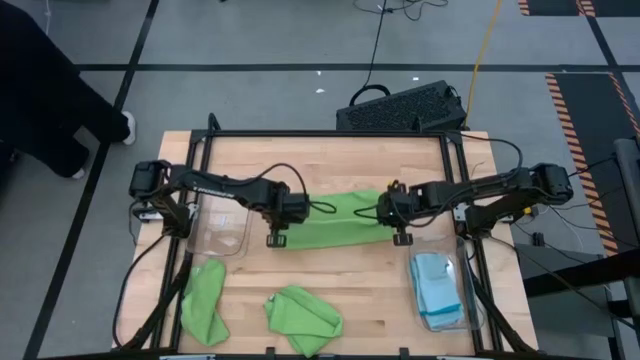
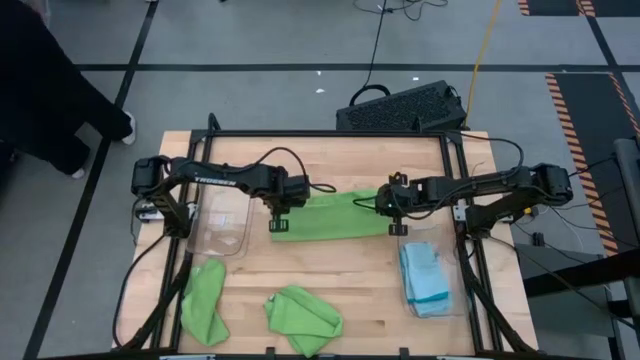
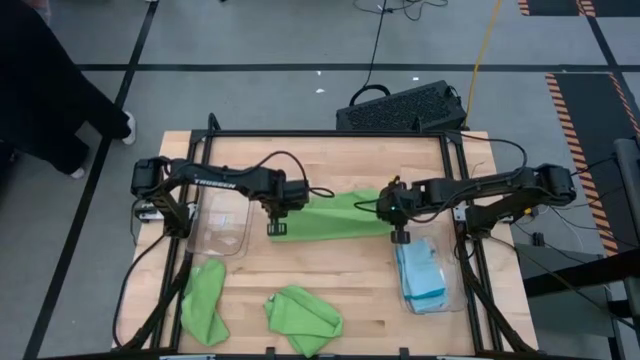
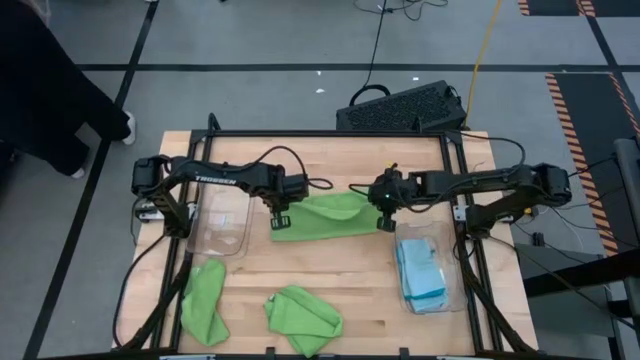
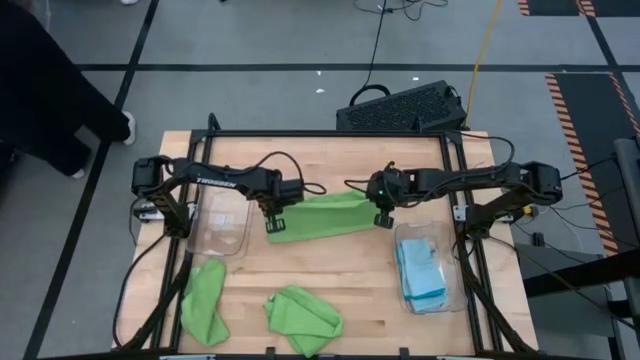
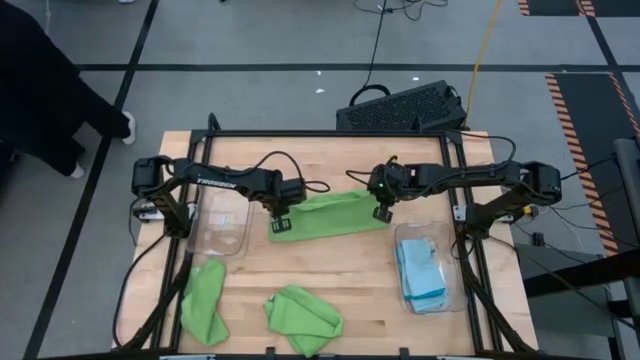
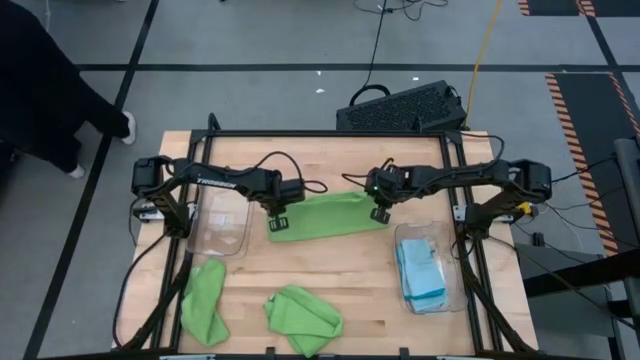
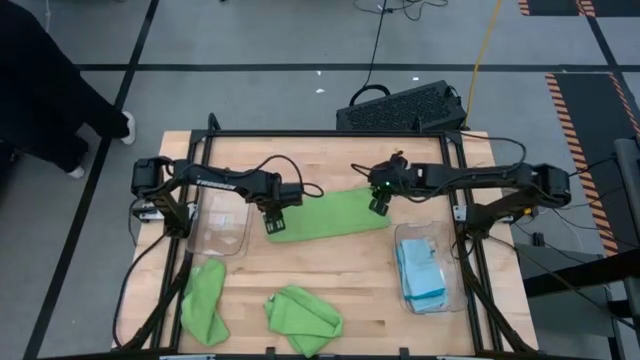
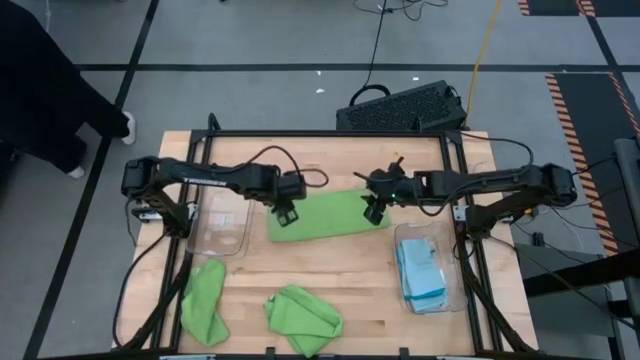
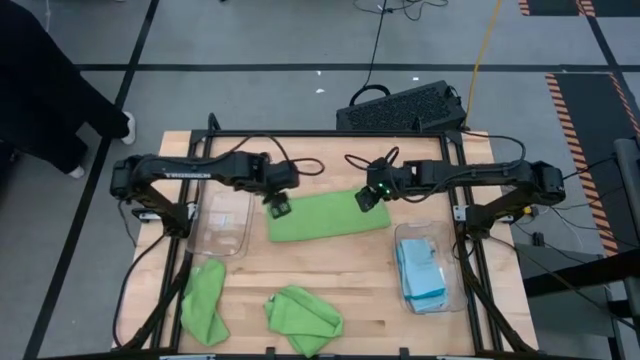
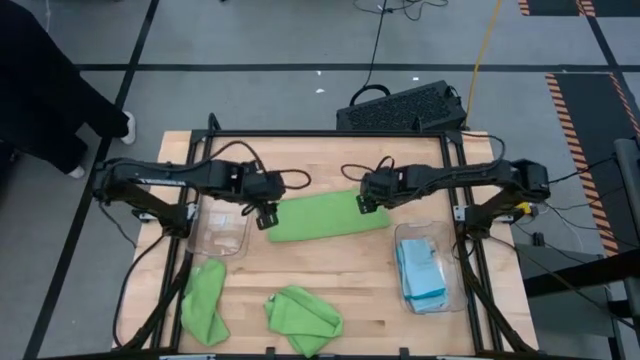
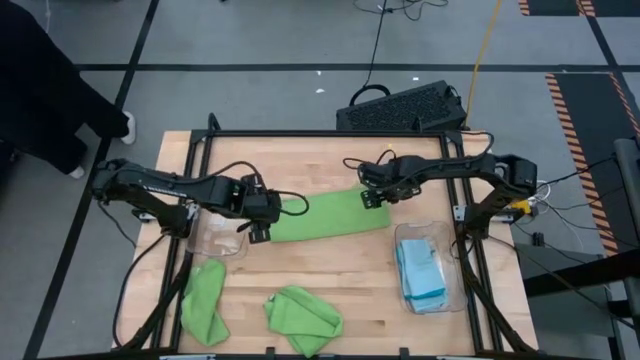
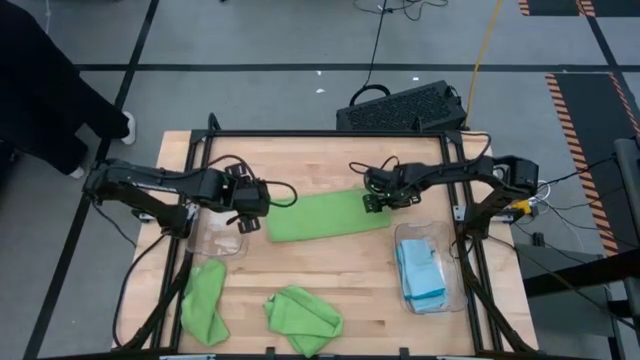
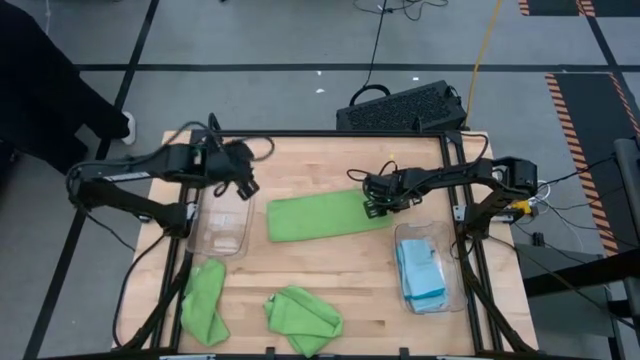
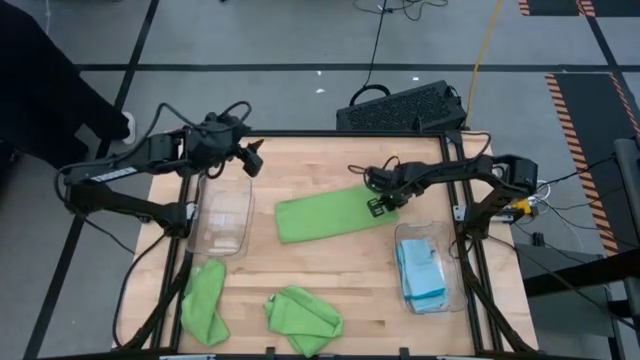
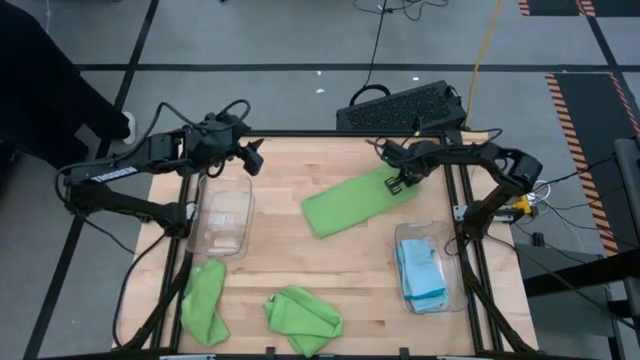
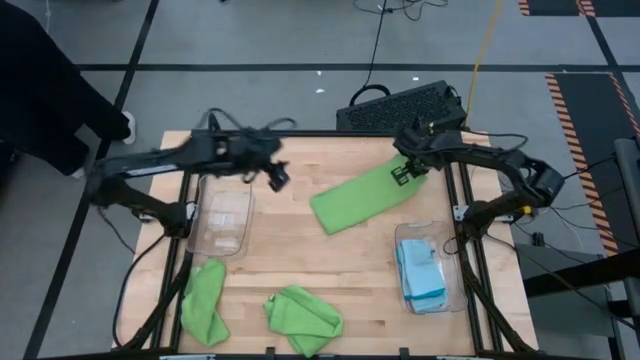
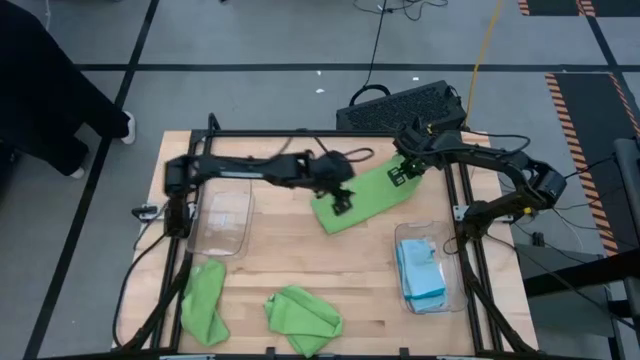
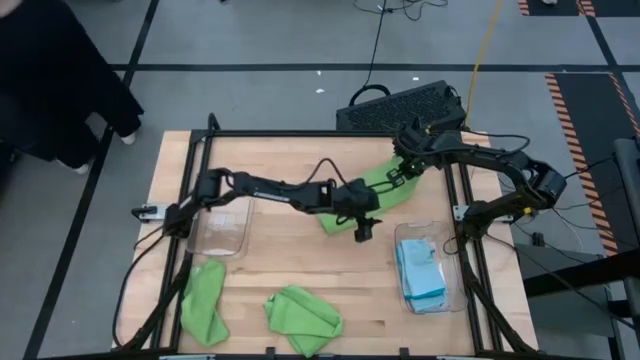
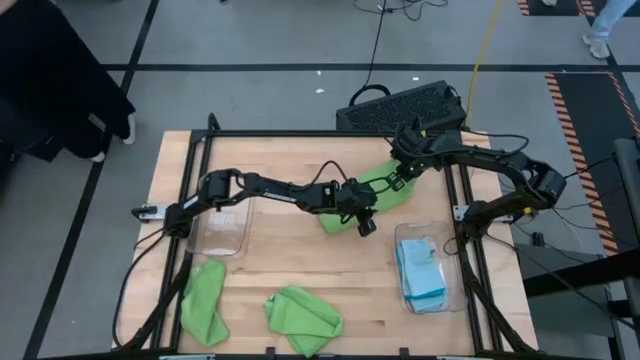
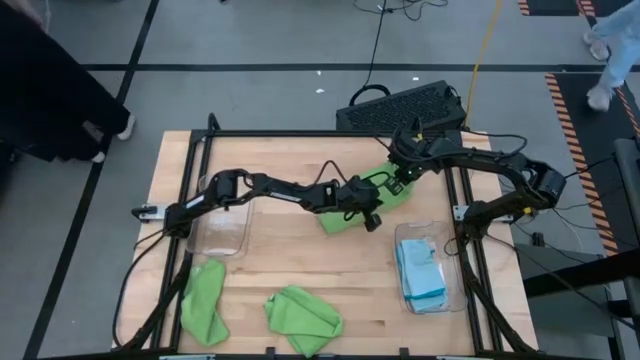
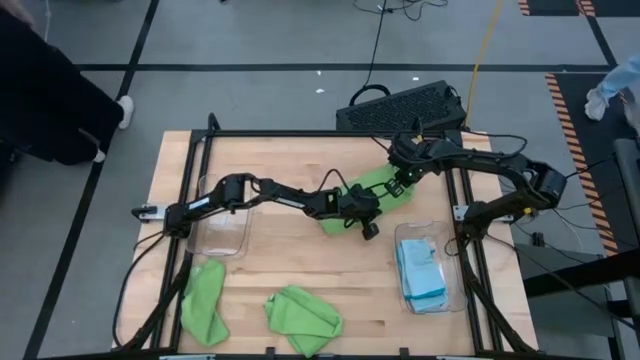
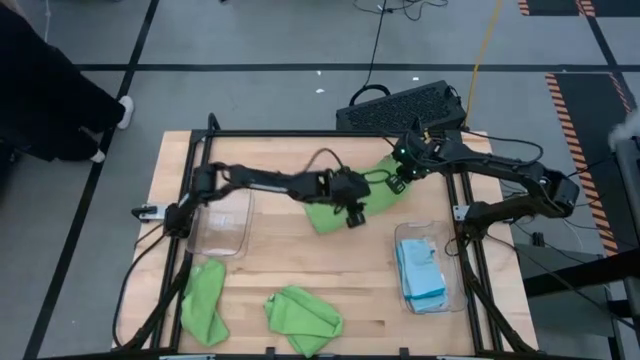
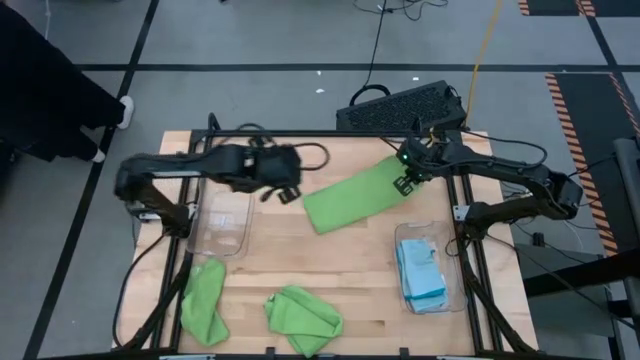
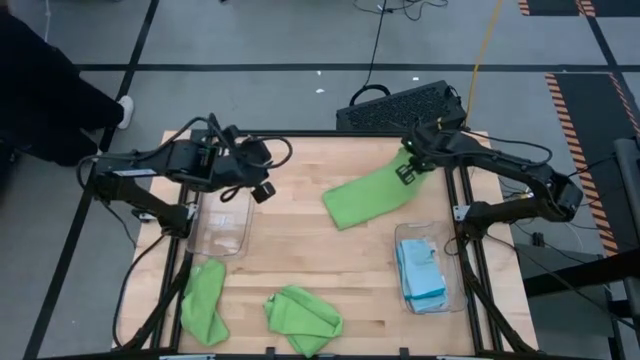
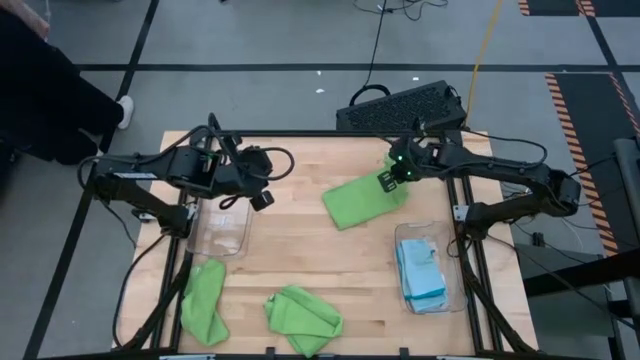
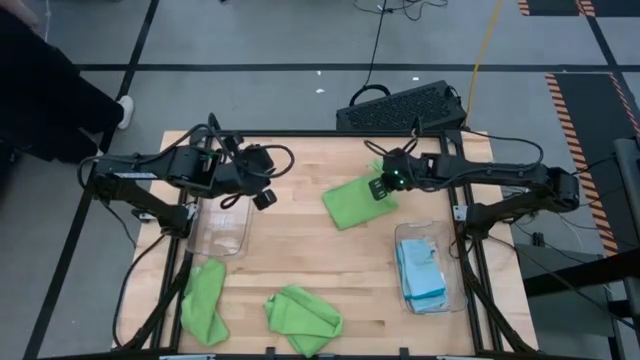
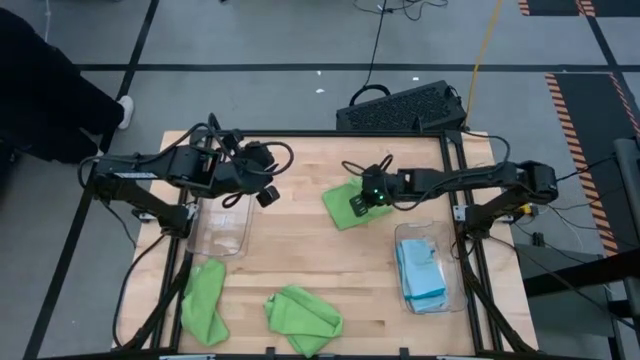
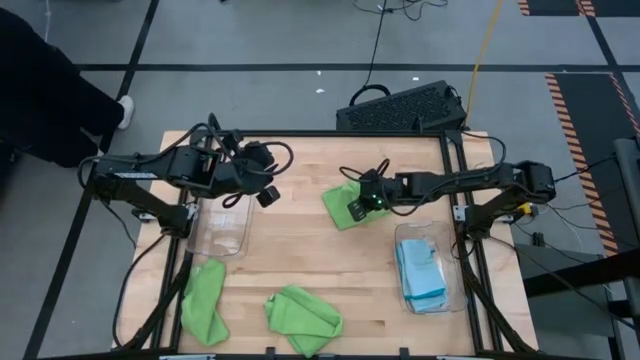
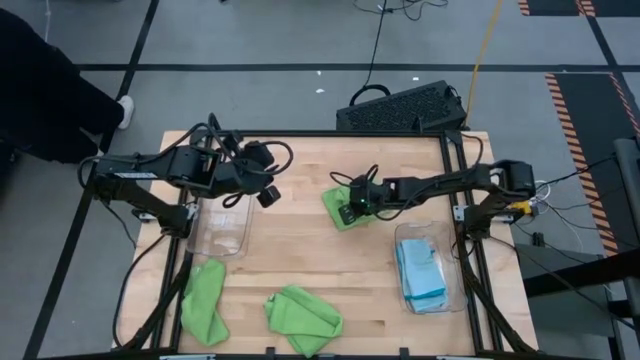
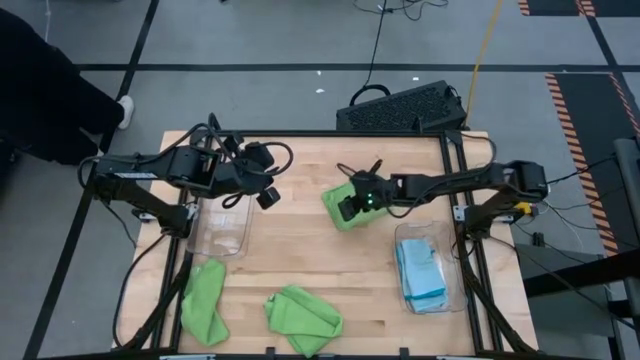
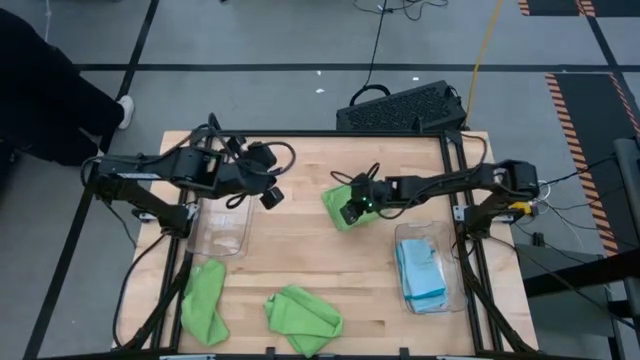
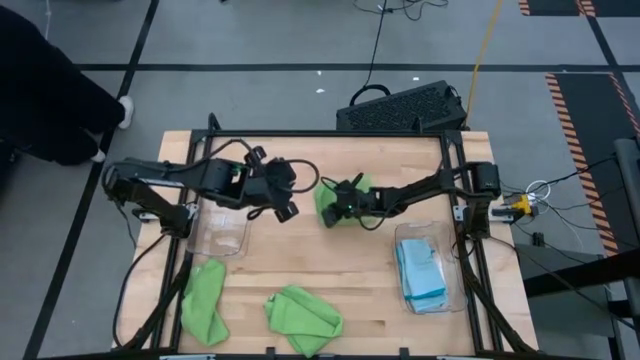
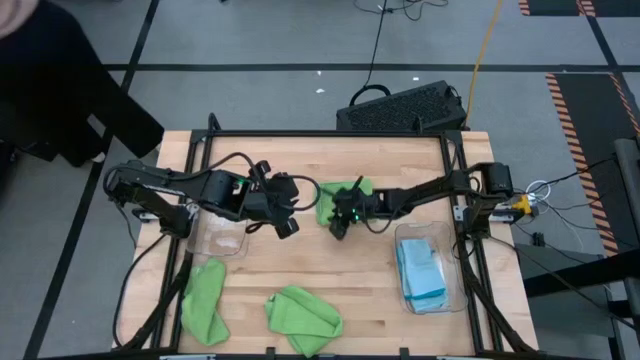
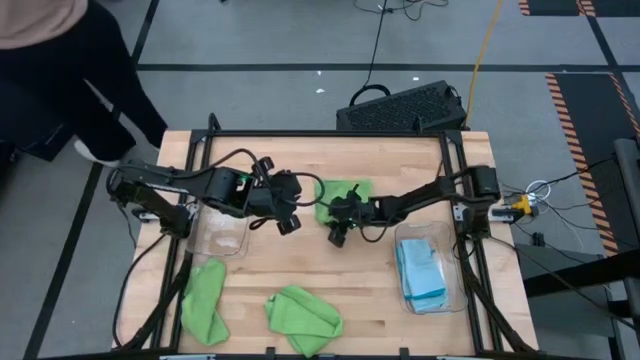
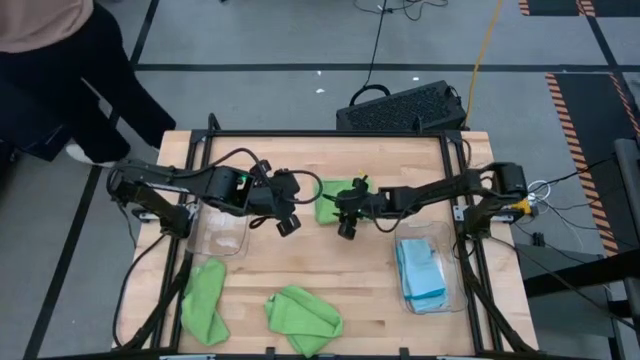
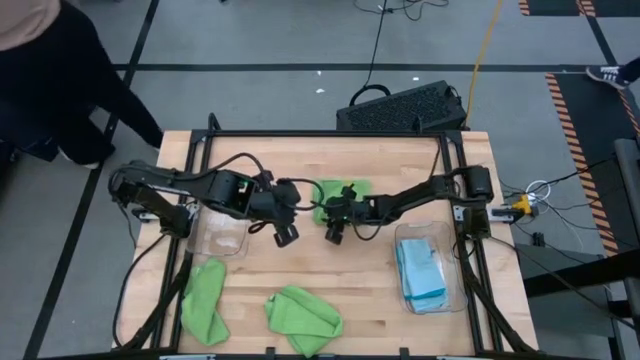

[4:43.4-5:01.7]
Task: Sort microfiber towel by color & place in baskets
Fold the top green microfiber towel

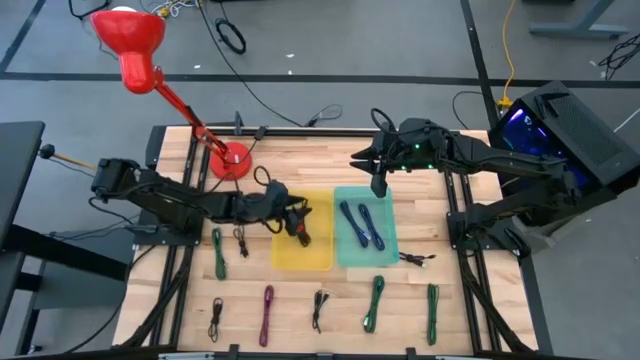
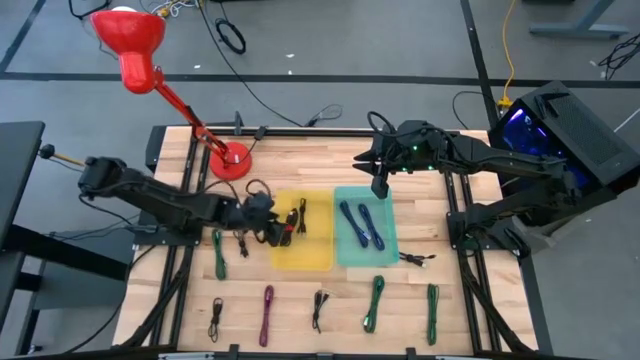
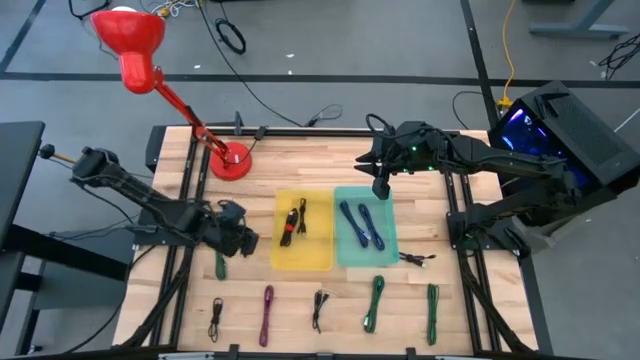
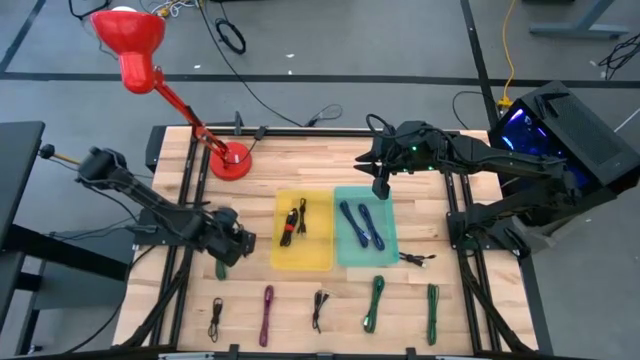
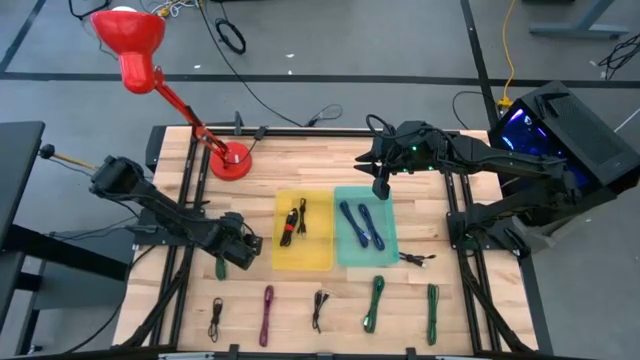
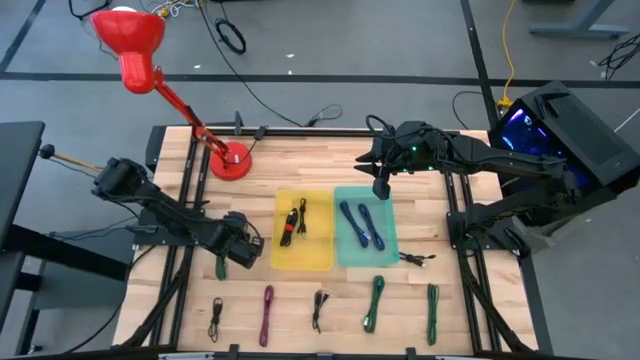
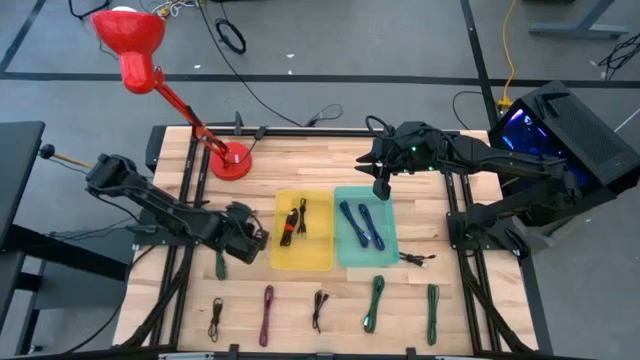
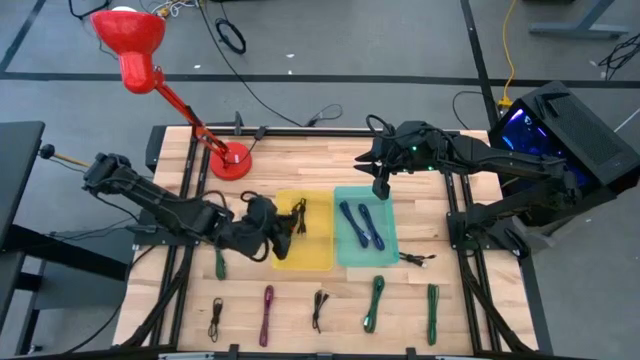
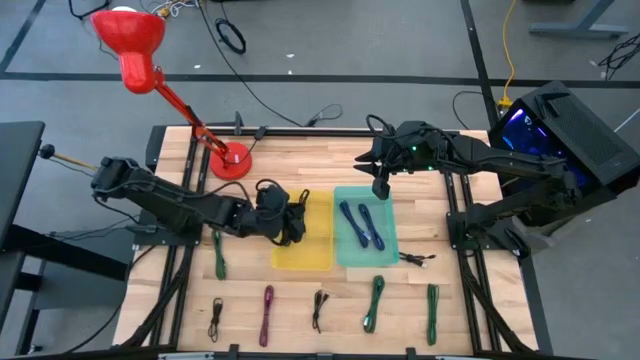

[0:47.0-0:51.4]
Task: Pick & Place USB Port
Put the black charger cable into the yellow bin
